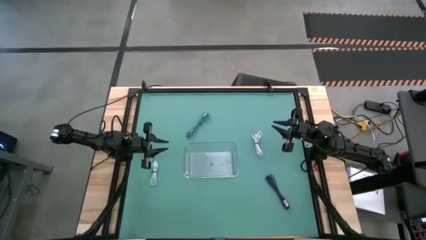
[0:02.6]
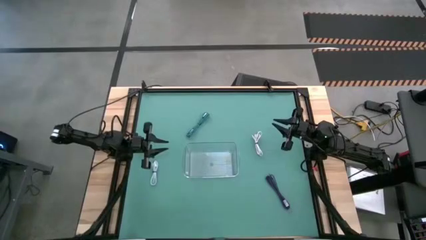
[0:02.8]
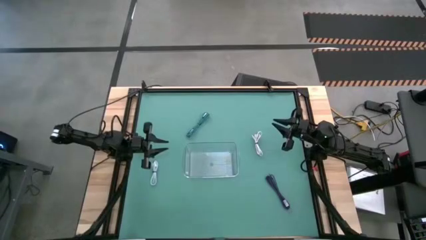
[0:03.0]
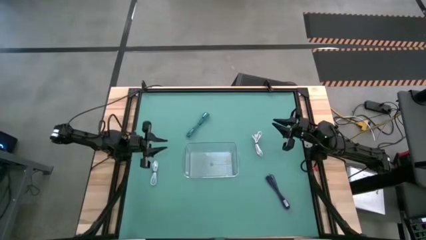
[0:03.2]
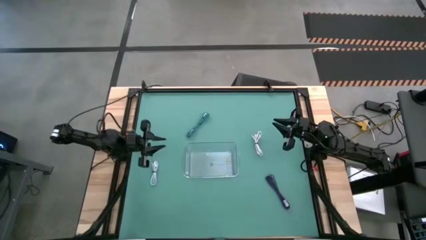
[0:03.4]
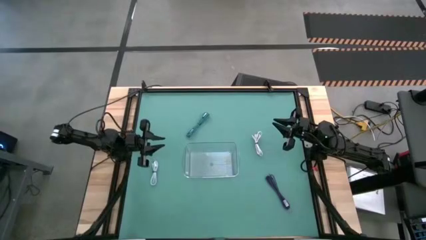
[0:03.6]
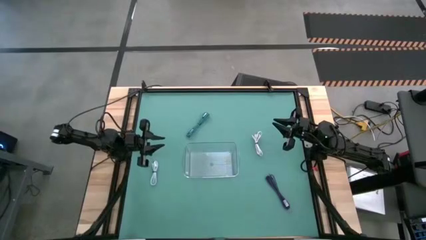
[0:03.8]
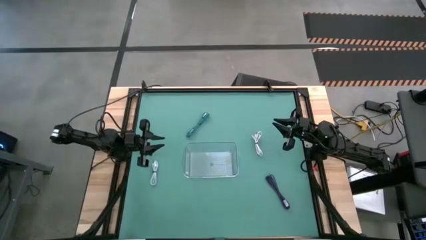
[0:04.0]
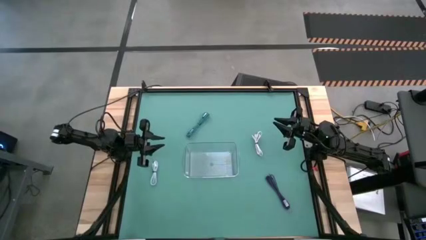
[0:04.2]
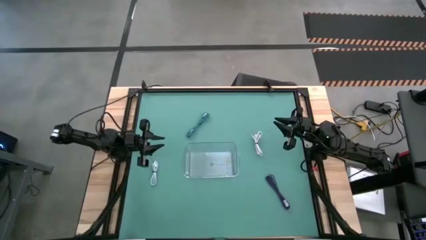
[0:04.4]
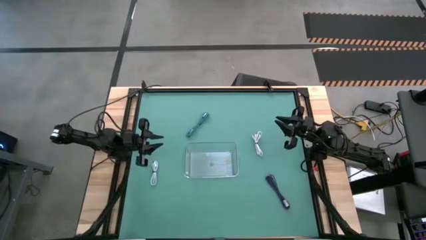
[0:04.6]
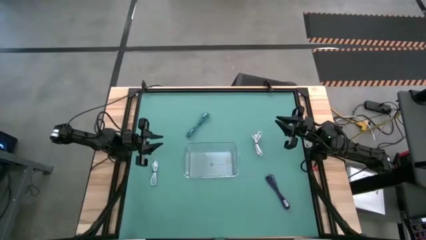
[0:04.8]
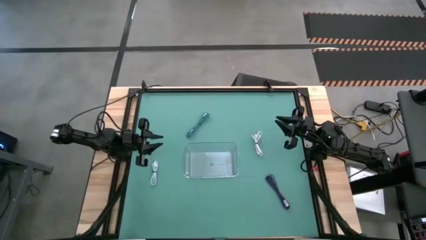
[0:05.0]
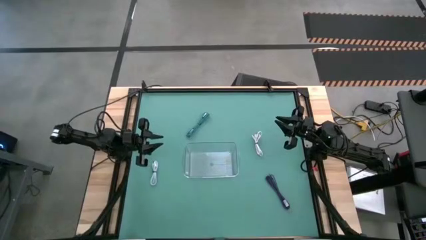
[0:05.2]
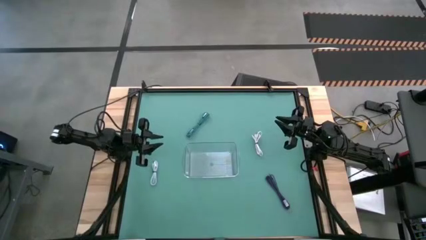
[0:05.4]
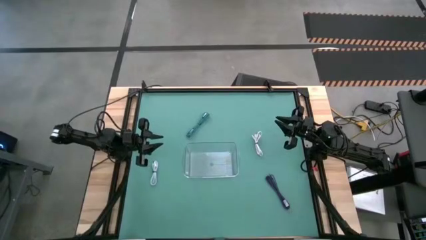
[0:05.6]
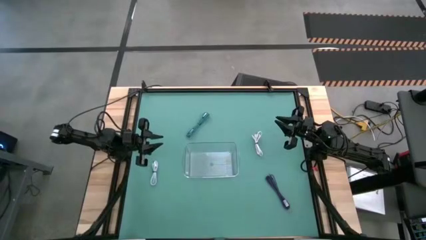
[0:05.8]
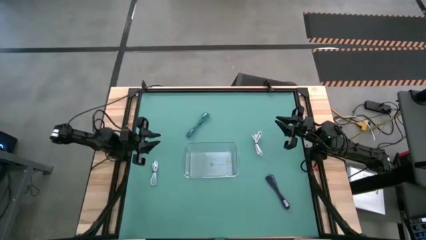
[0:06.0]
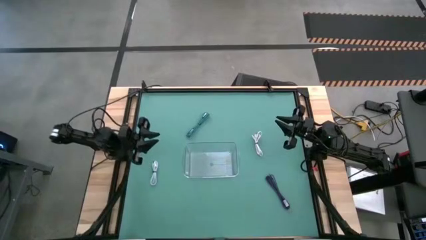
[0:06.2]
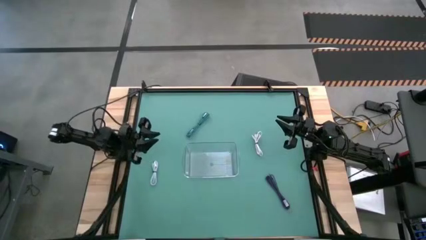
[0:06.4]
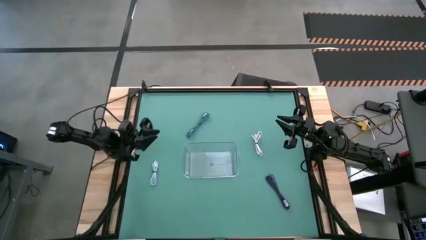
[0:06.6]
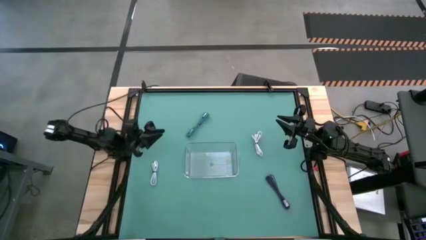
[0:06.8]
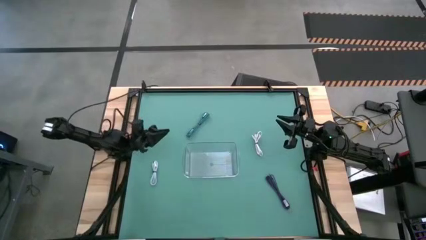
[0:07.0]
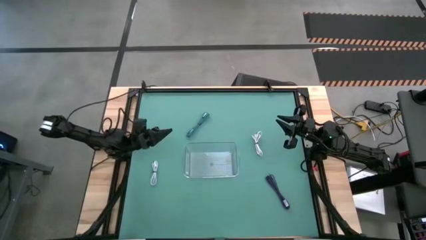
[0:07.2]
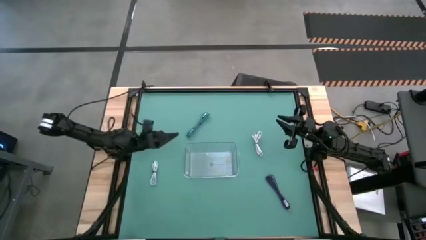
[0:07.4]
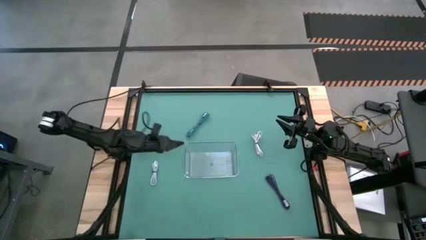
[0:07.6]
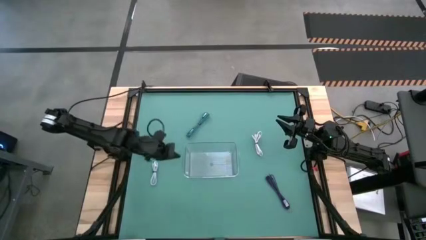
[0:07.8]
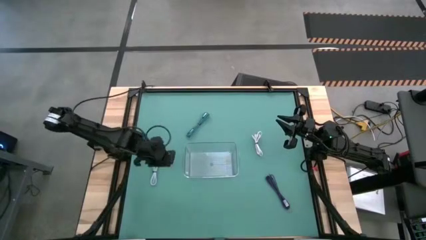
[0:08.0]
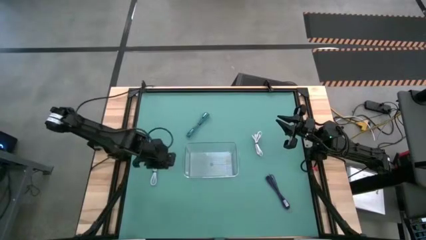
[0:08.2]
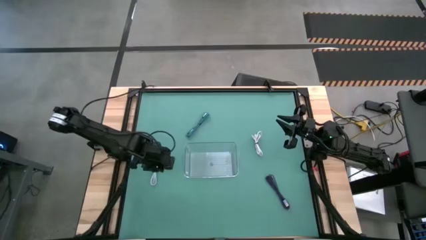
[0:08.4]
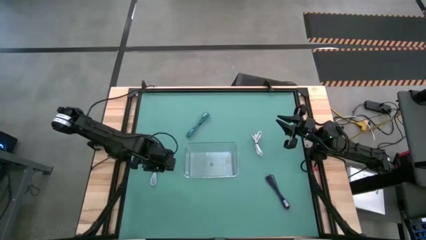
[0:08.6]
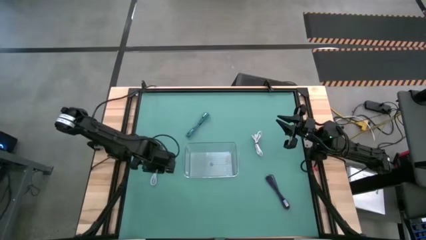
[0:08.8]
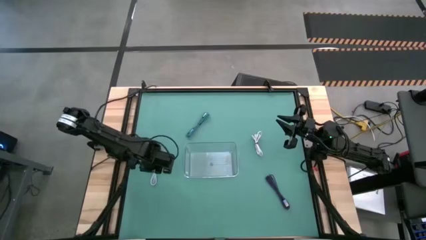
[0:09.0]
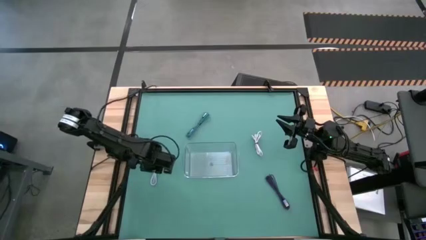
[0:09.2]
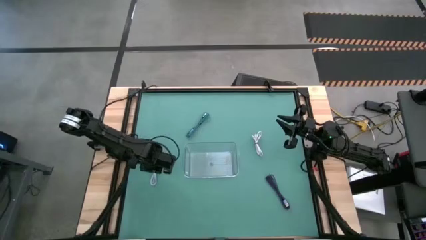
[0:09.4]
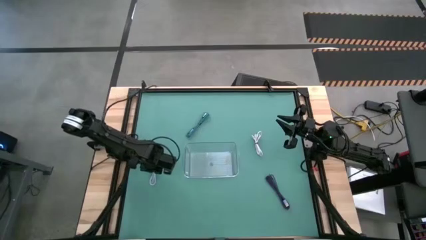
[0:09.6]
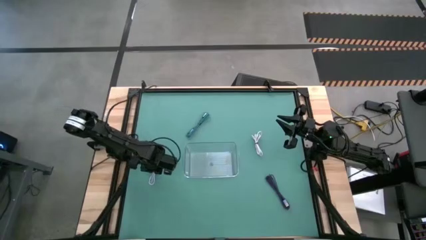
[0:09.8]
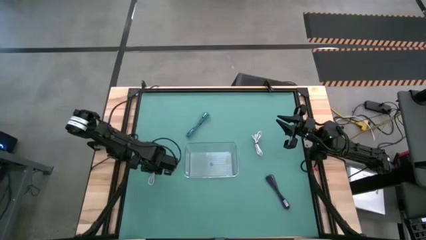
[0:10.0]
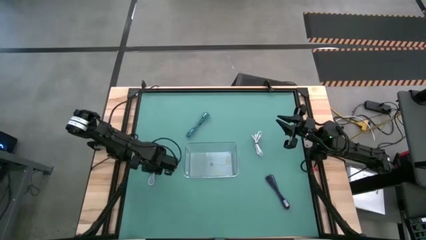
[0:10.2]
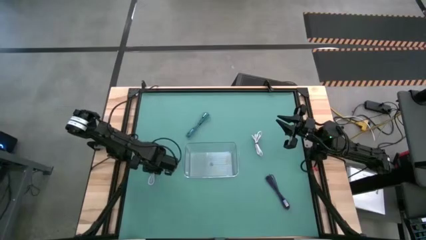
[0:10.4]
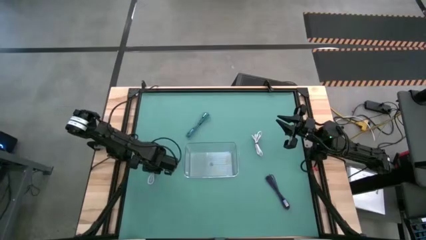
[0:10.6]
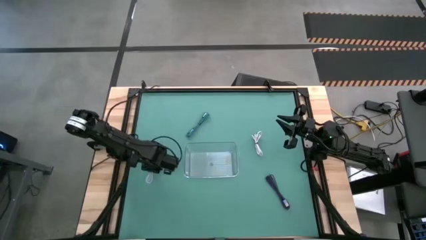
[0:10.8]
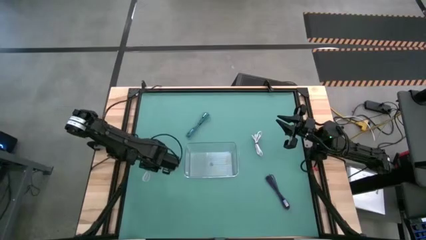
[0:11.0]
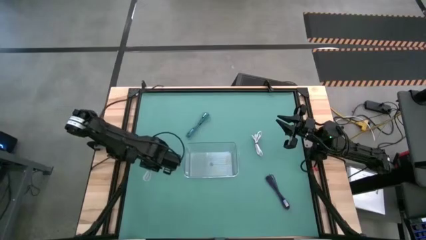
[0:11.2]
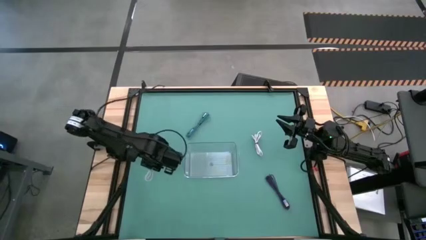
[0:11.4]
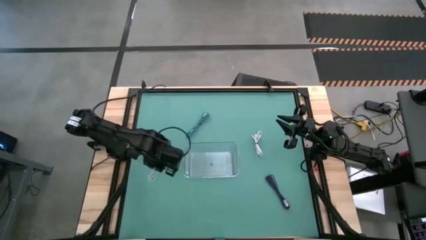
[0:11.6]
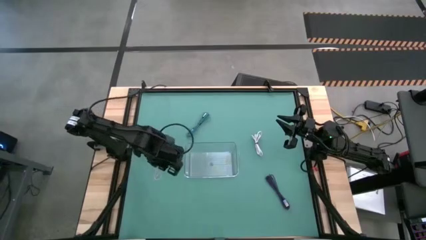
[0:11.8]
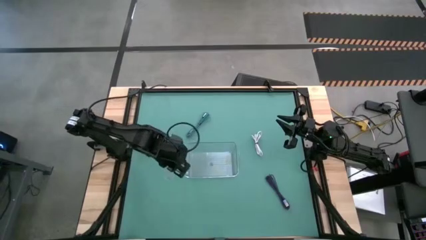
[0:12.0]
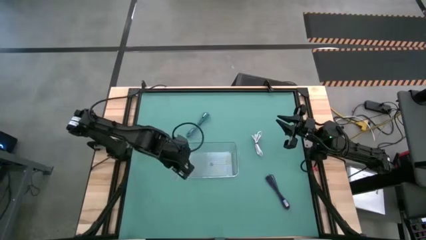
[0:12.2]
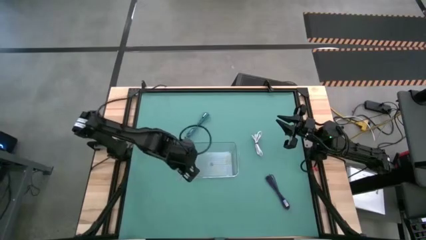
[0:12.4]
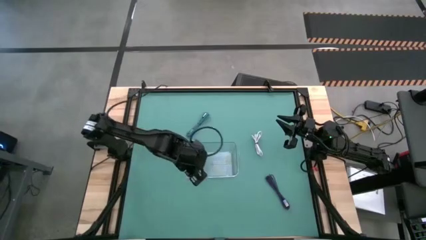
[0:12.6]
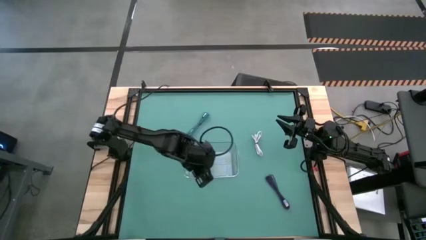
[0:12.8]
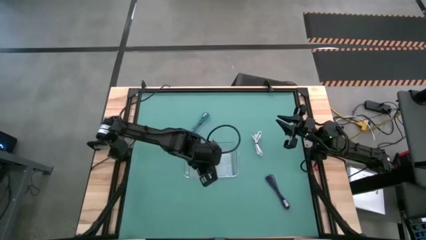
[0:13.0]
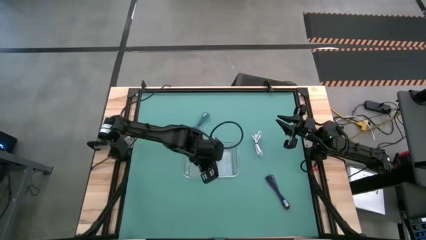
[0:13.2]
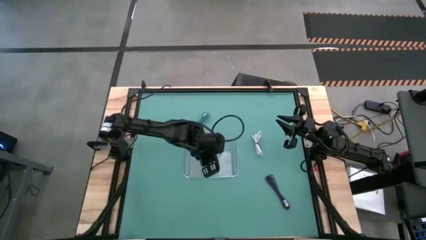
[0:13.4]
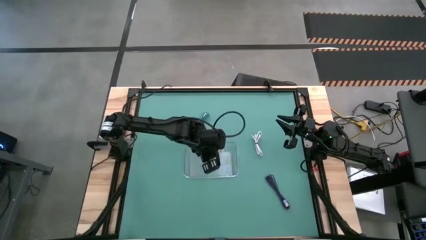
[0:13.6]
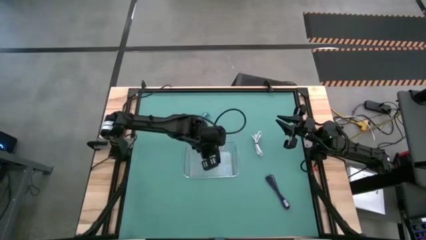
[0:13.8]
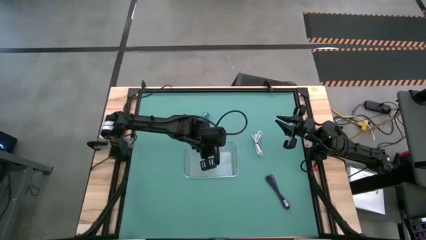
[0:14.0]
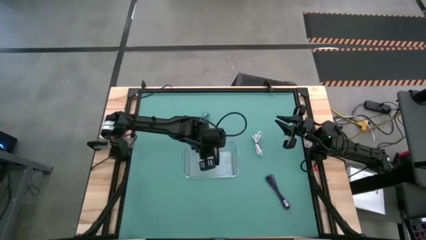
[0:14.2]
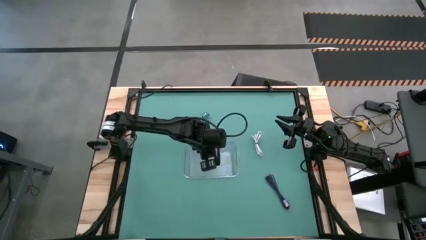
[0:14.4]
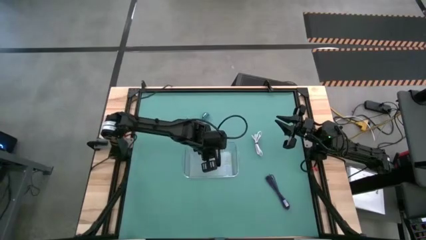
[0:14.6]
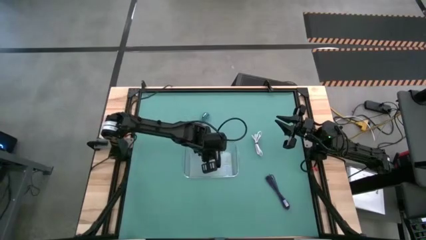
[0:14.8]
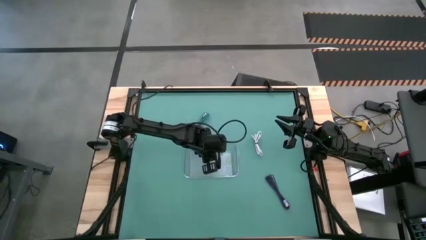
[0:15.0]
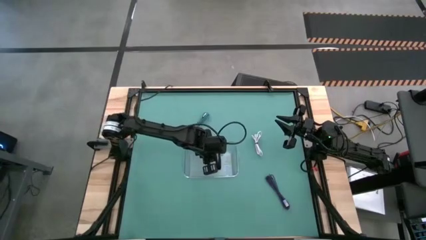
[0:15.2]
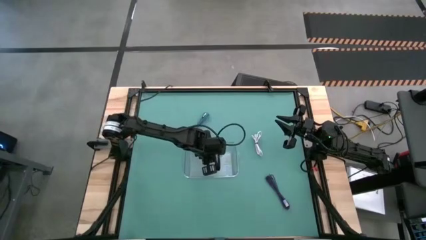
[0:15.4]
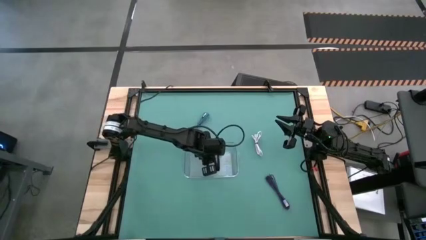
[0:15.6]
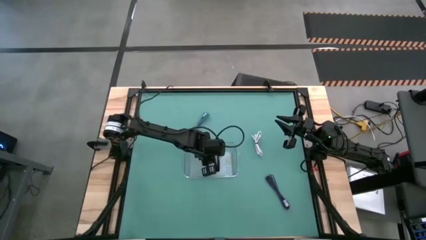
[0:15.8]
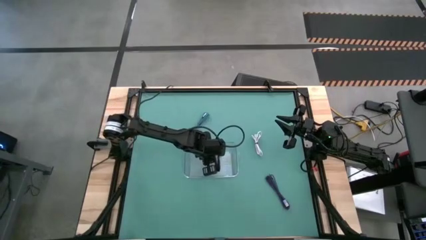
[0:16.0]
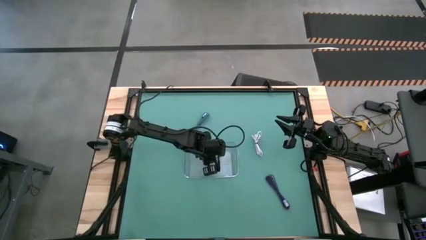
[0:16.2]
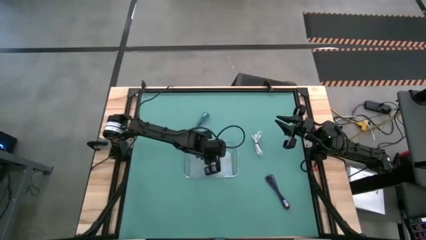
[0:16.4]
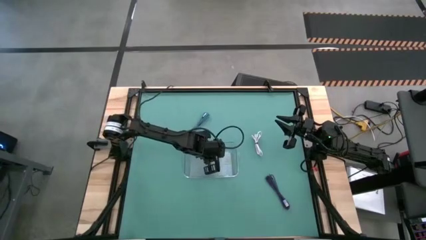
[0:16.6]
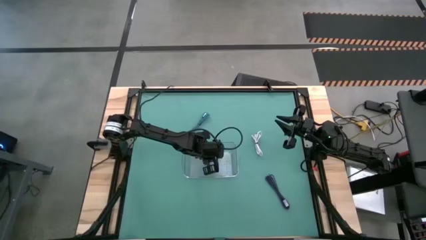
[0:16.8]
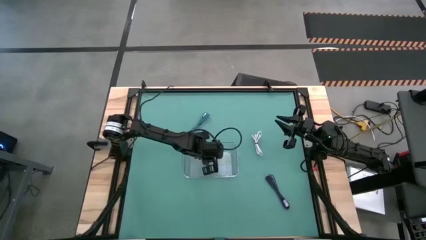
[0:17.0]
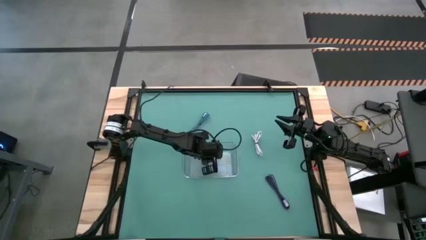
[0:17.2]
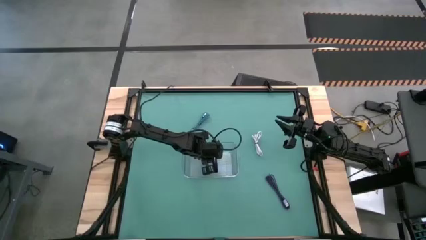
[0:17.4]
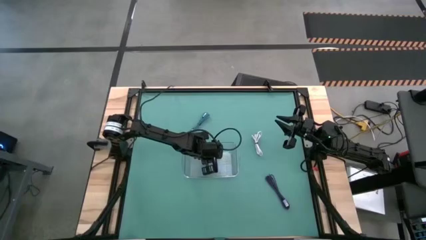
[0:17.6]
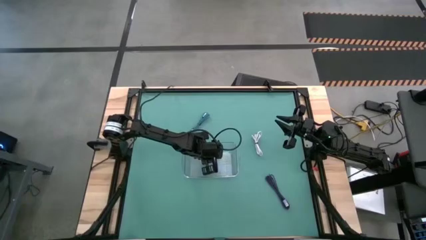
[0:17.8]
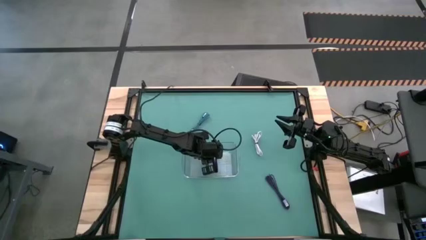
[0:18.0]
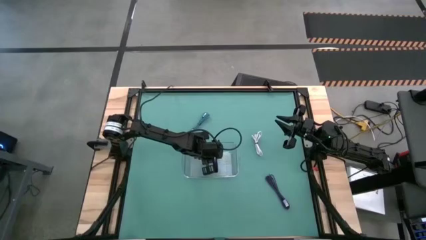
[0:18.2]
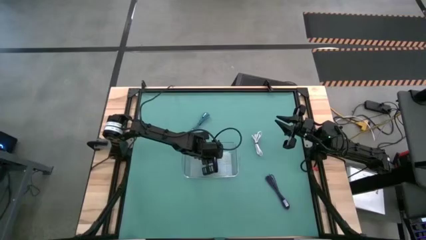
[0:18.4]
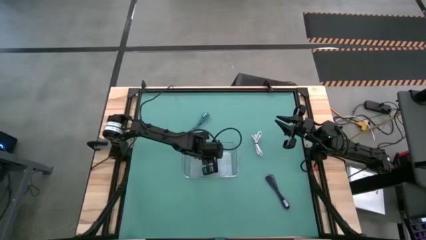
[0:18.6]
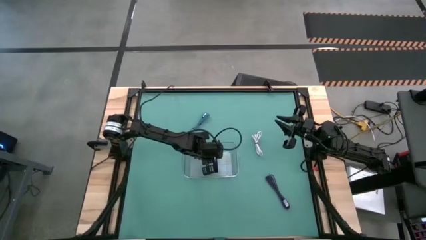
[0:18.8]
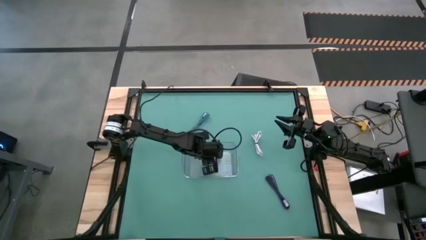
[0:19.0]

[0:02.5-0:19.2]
Task: Pick and place USB-C Cables
Put the left white charger cable into the transparent bin
